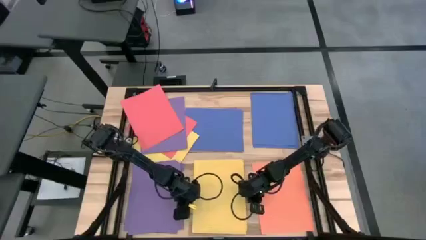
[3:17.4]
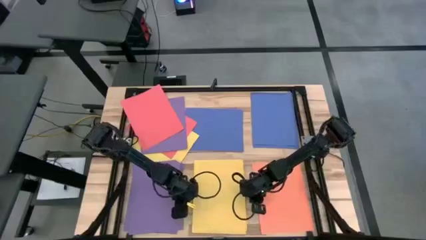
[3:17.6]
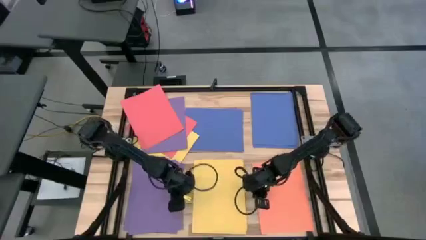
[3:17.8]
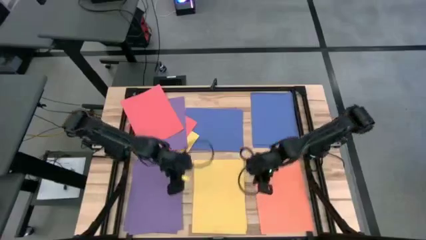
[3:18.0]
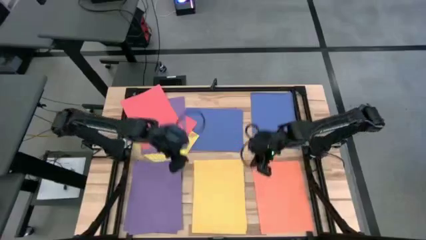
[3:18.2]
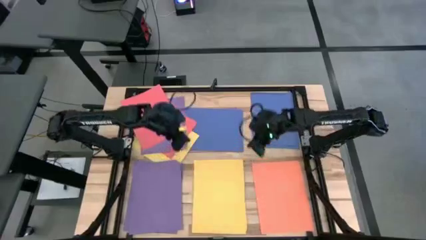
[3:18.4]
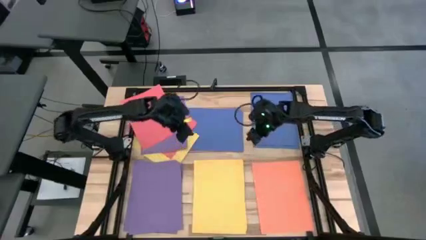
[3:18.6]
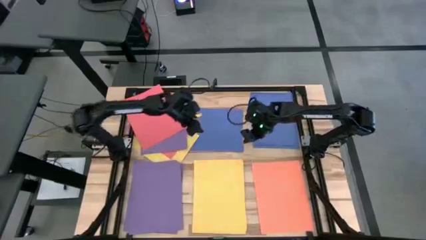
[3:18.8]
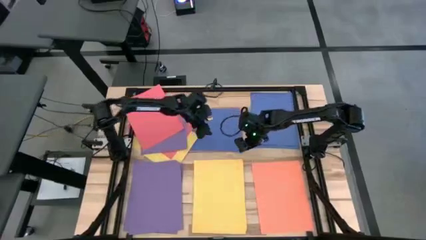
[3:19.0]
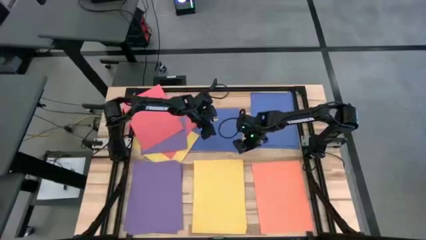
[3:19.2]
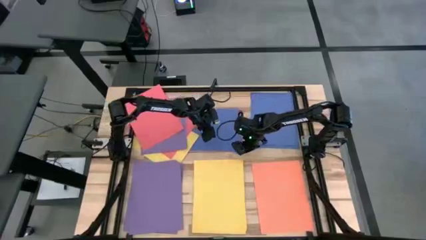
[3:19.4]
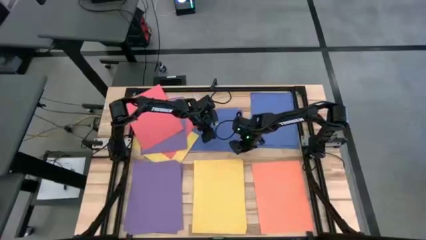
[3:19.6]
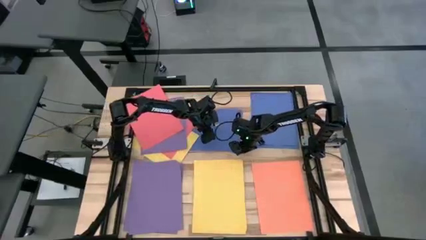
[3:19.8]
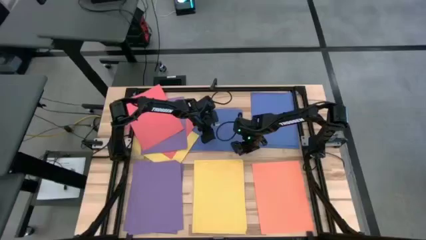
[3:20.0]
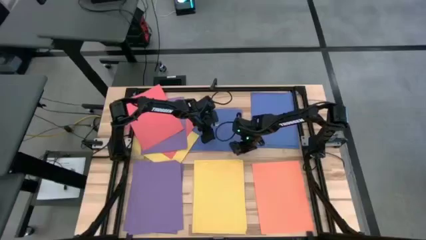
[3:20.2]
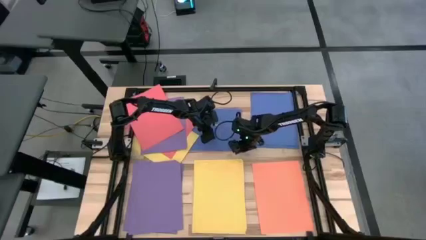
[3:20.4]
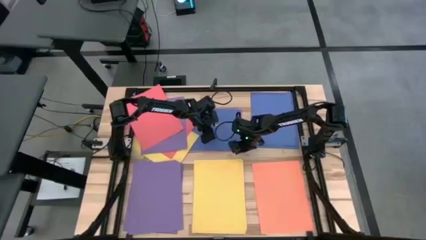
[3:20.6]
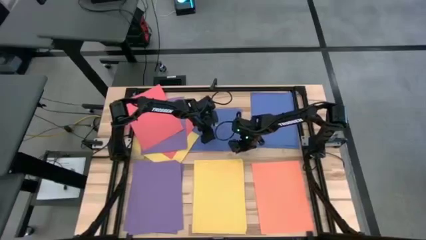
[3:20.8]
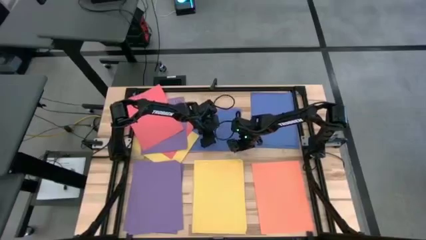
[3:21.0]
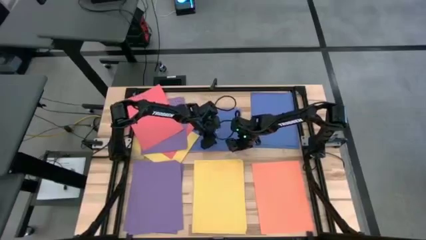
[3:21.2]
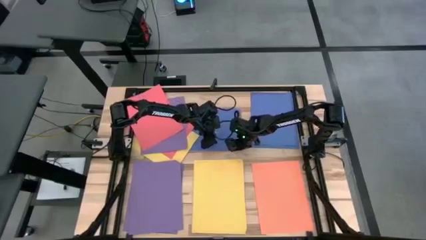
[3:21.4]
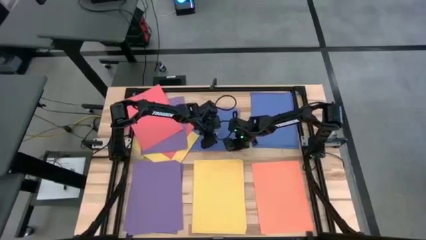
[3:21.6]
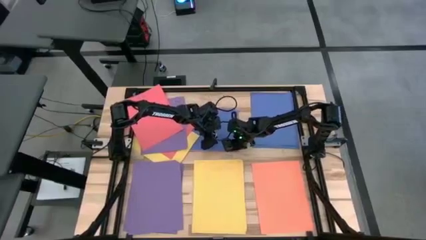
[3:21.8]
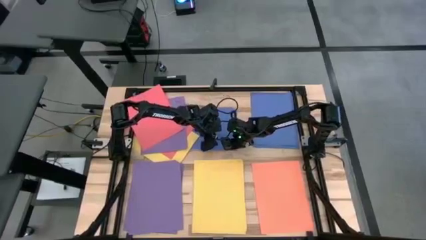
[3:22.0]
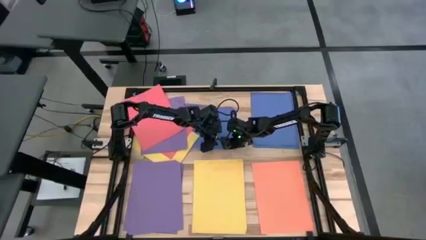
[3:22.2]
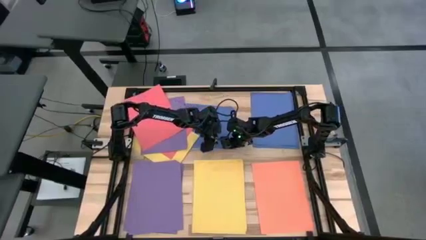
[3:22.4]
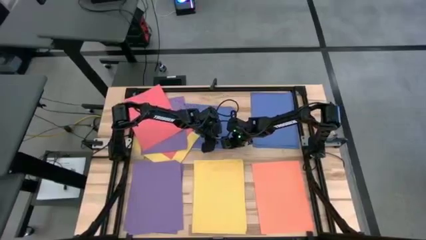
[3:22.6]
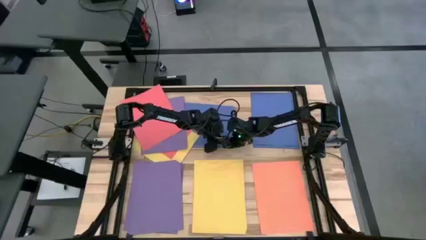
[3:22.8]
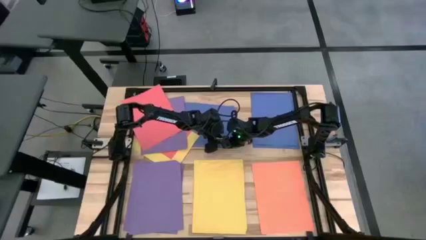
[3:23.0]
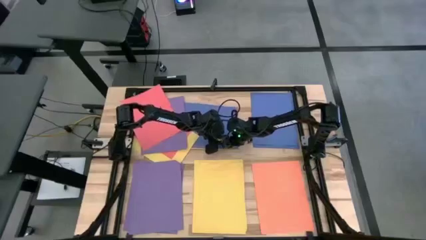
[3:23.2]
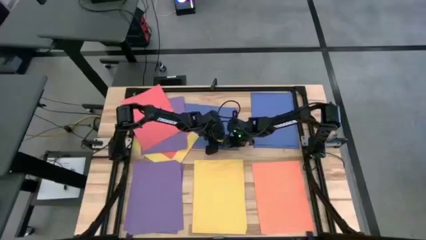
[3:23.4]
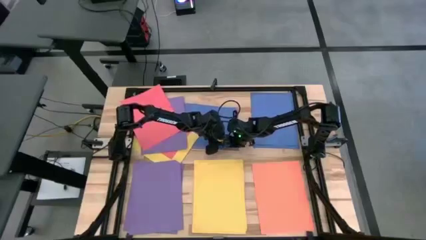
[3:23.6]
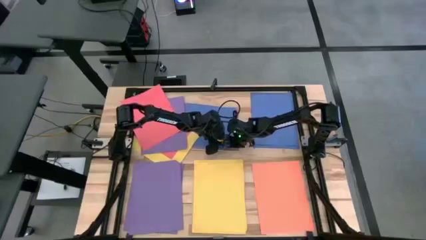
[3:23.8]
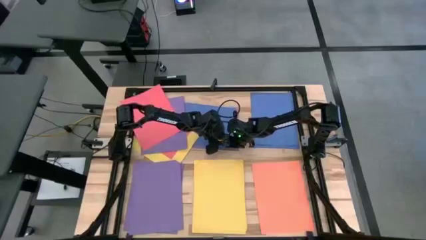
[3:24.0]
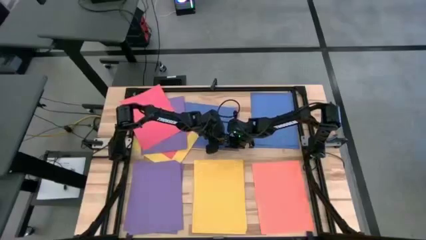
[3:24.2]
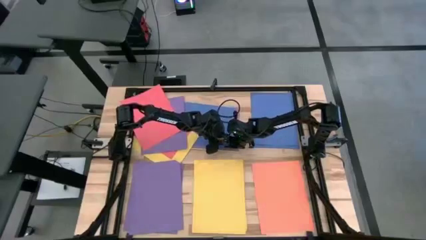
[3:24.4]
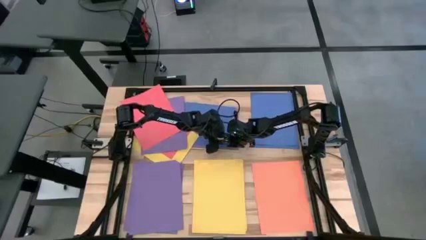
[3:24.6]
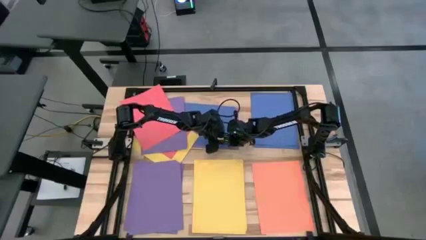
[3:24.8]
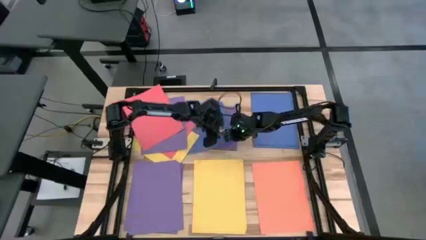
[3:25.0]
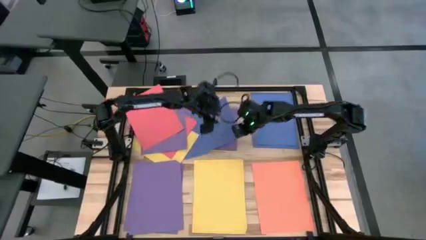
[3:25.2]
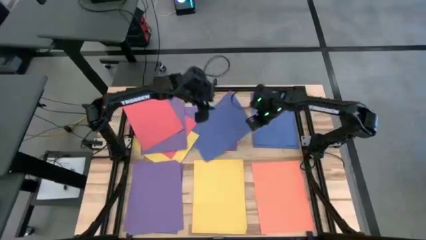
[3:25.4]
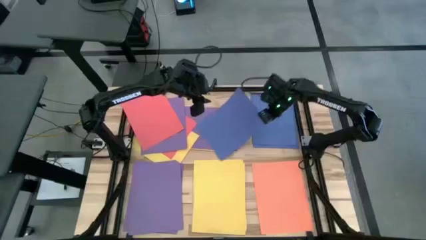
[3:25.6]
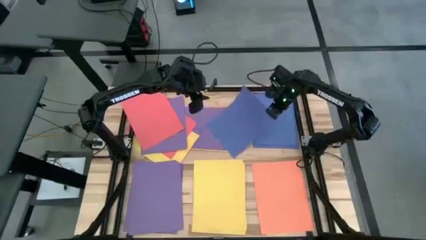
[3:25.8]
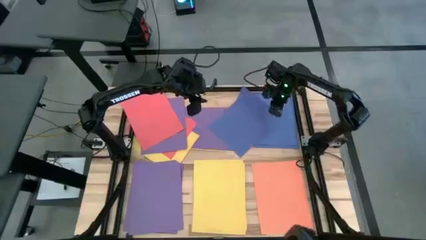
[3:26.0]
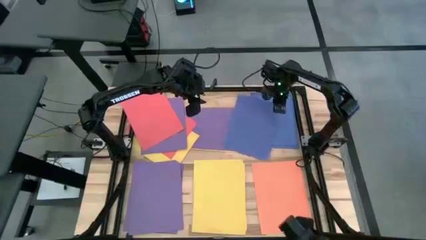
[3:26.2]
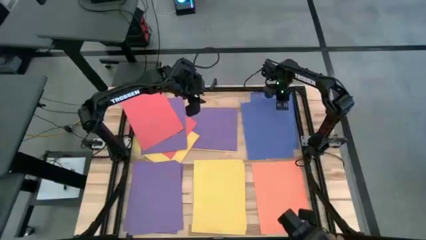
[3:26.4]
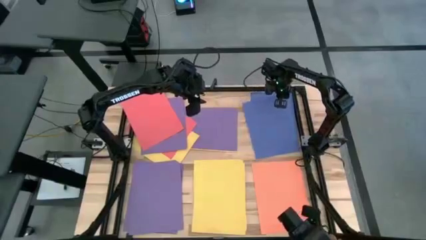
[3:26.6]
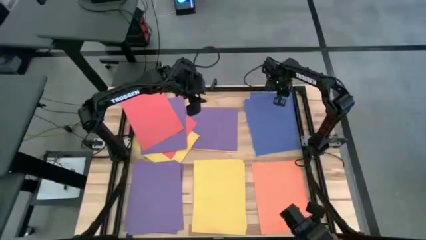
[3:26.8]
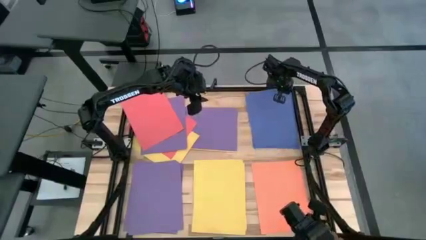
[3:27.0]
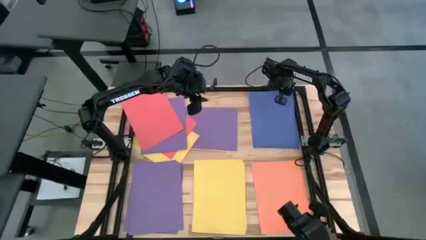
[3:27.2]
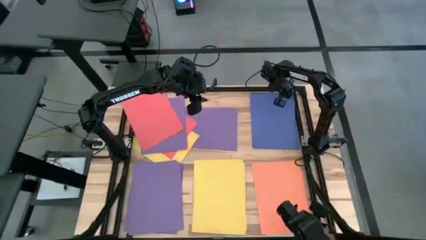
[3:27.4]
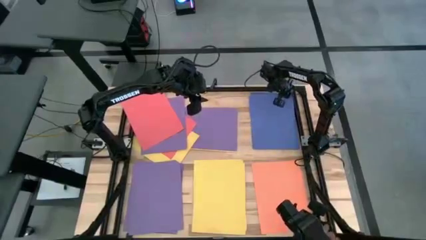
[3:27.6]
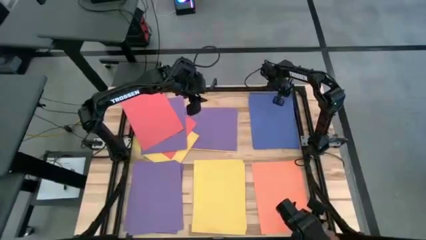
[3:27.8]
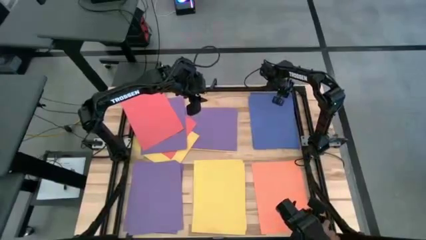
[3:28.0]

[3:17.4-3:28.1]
Task: Organize paper
Stack the blue paper on top of the blue paper

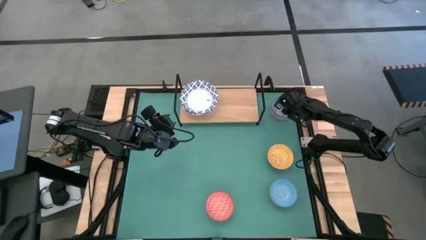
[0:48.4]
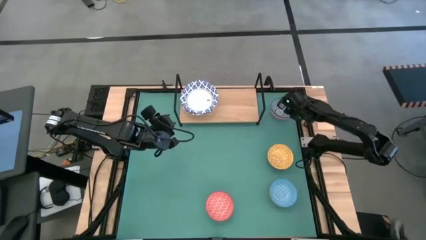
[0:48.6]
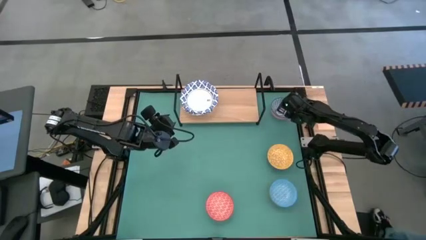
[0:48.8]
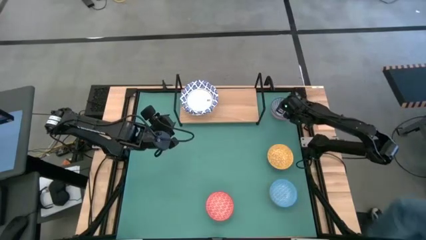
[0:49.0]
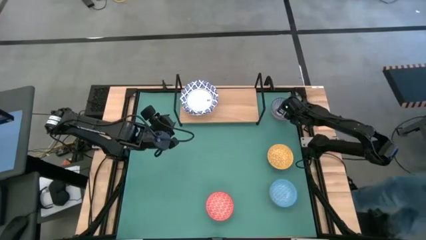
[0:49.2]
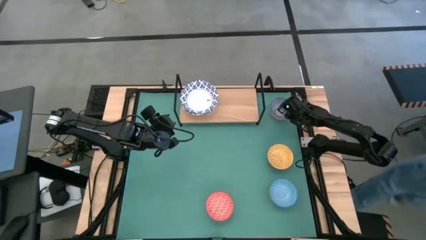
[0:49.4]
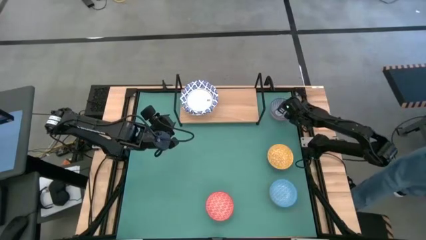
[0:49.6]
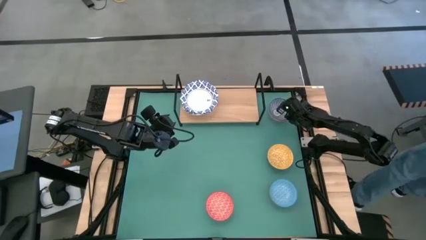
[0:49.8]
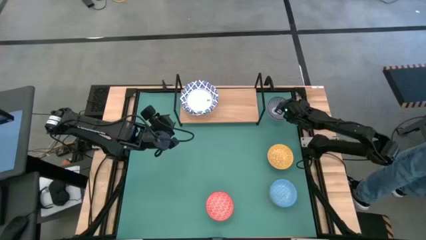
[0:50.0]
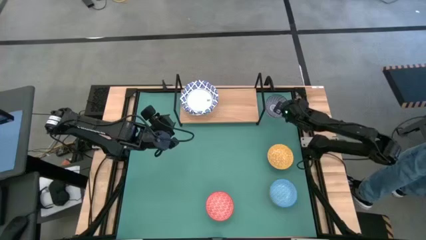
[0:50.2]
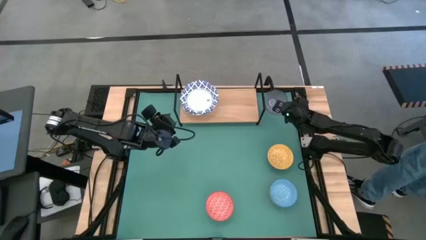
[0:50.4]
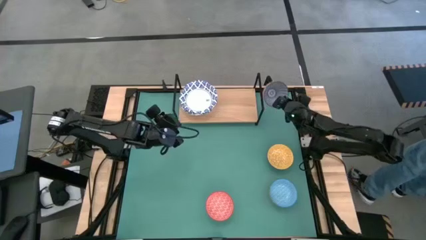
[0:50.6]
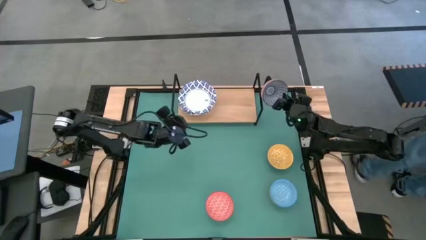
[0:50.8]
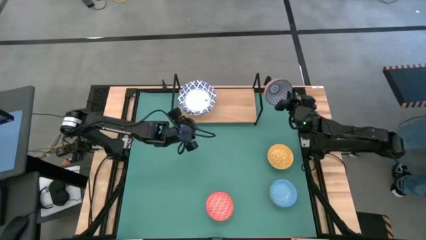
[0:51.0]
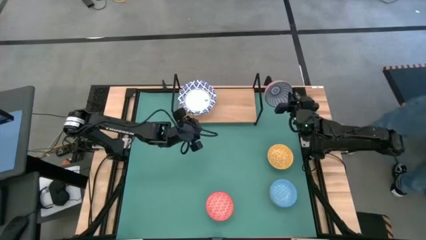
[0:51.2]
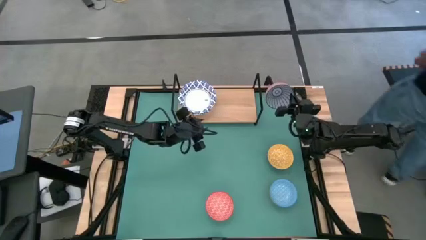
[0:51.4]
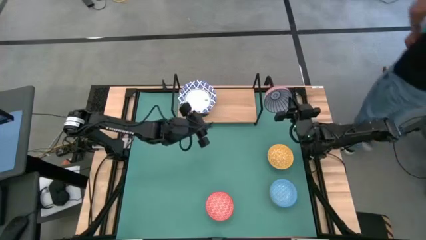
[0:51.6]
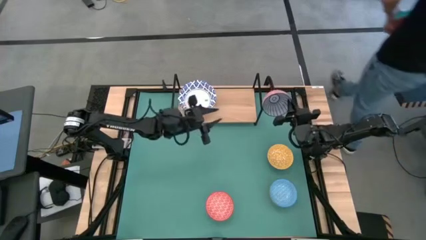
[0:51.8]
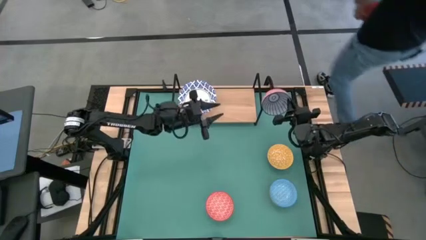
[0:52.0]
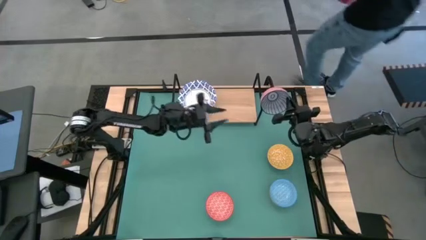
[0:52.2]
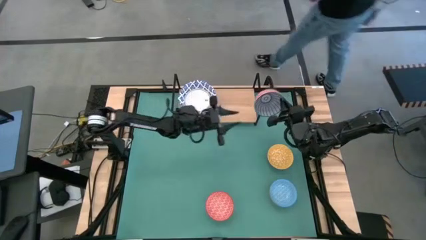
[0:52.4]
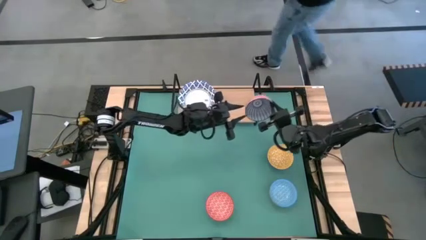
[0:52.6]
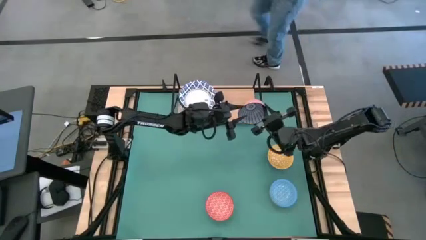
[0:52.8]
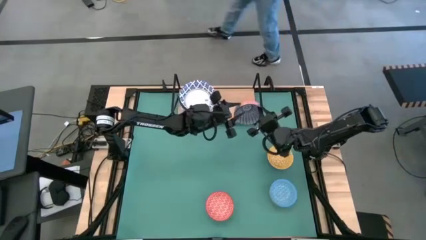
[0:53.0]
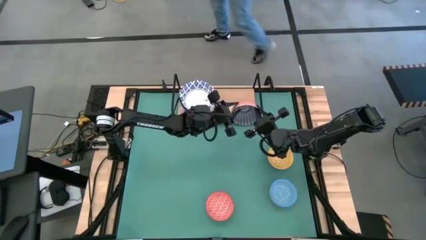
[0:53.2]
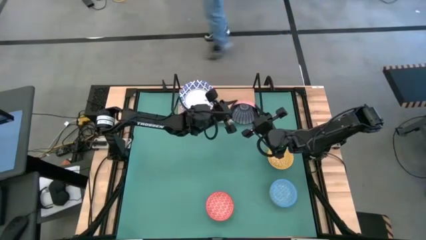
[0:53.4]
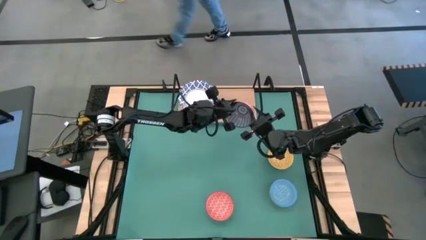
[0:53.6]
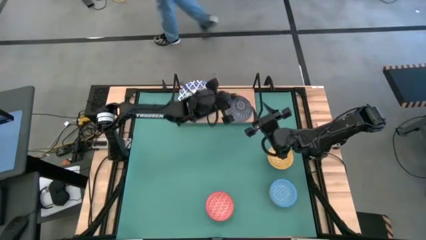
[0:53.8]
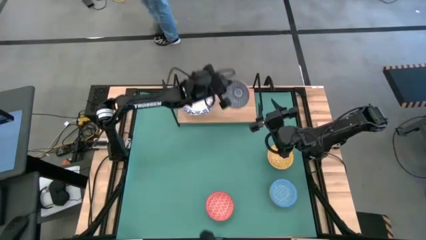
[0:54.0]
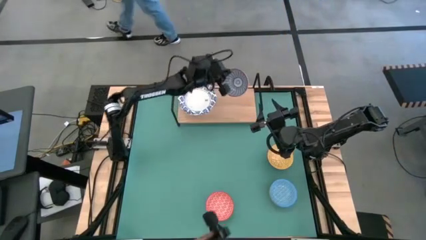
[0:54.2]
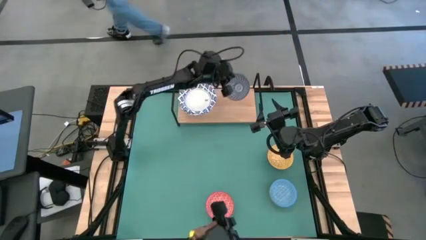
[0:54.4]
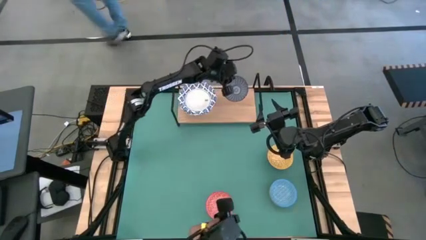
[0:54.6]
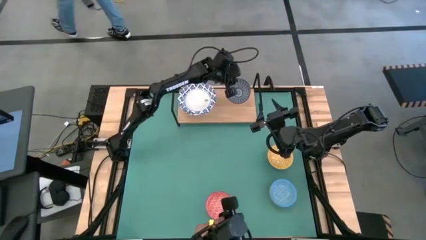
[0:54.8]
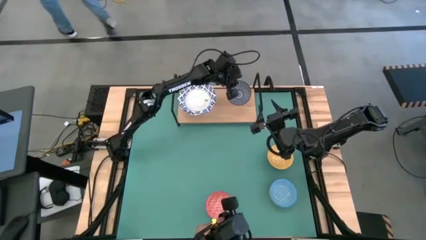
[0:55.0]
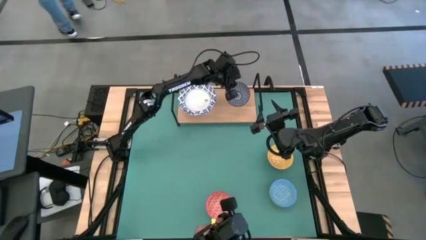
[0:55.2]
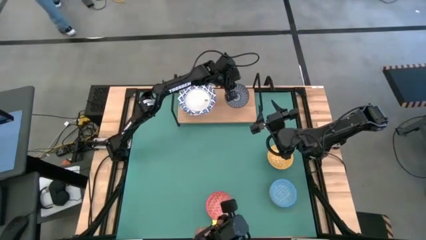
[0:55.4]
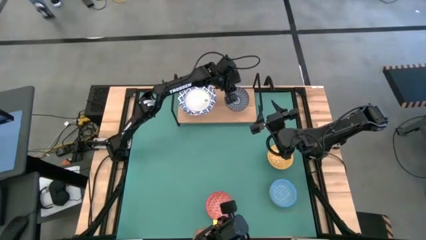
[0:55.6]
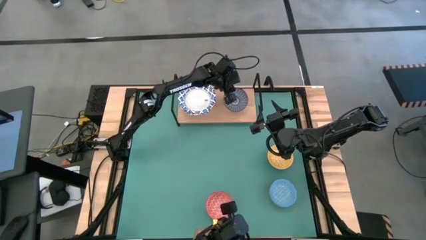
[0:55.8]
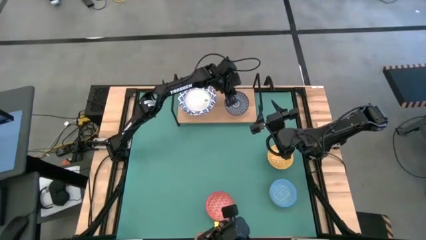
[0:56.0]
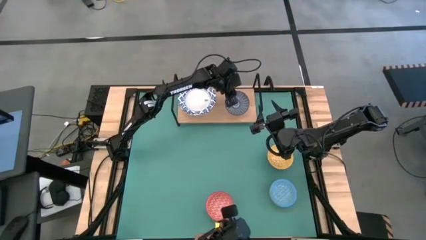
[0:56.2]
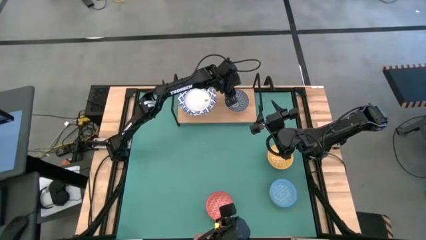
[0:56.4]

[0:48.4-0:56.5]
Task: Place and stack bowls onto a shelf
Put the blue patterned bowl on the shelf
